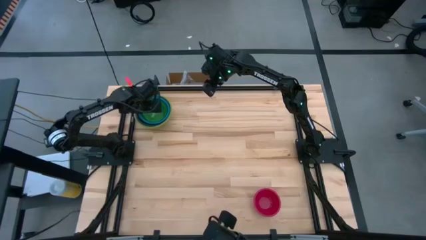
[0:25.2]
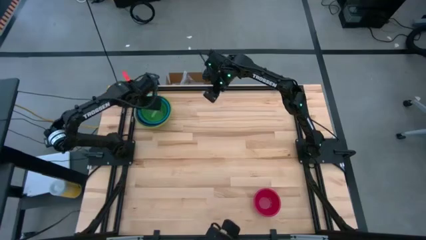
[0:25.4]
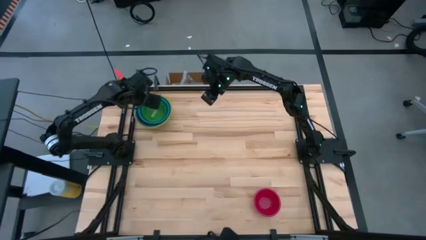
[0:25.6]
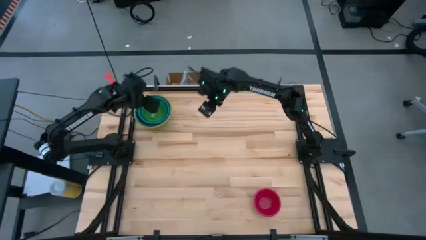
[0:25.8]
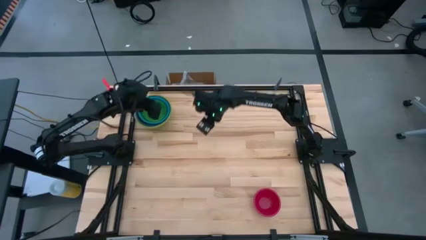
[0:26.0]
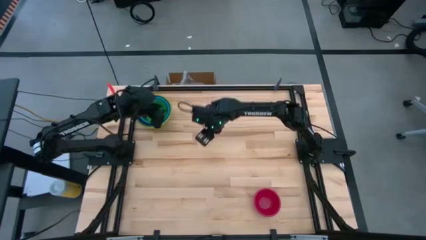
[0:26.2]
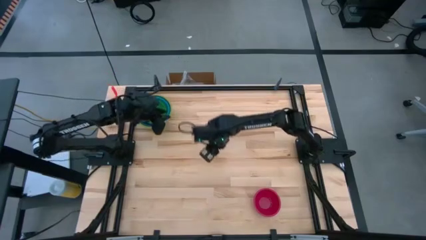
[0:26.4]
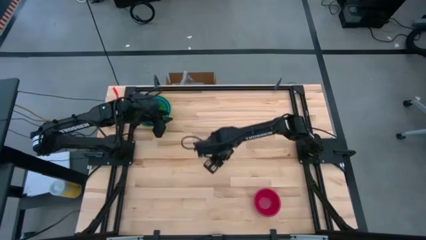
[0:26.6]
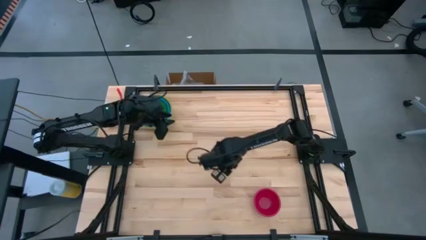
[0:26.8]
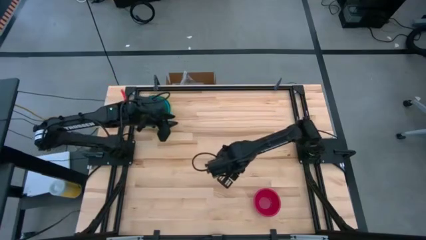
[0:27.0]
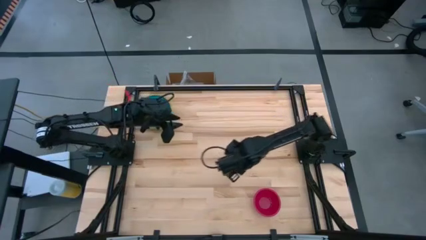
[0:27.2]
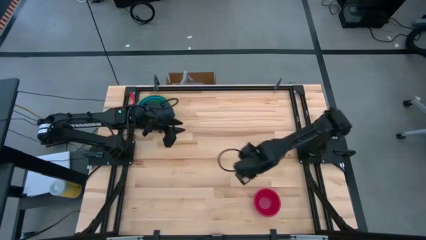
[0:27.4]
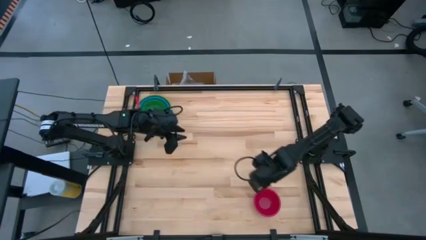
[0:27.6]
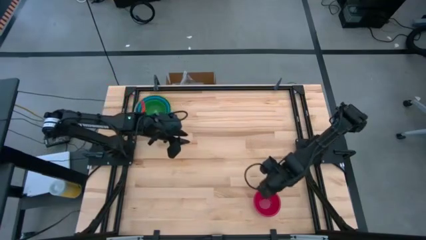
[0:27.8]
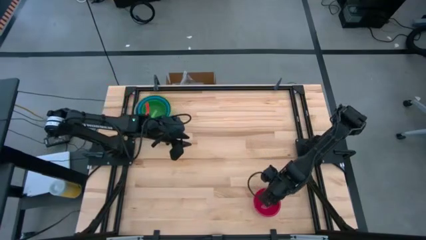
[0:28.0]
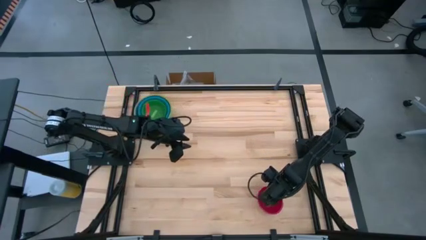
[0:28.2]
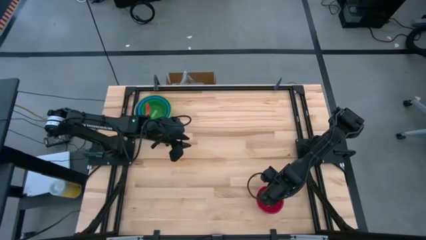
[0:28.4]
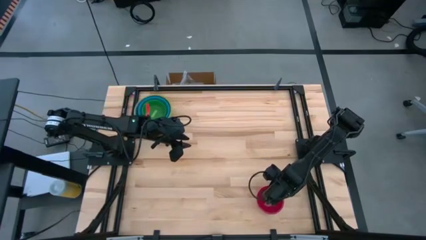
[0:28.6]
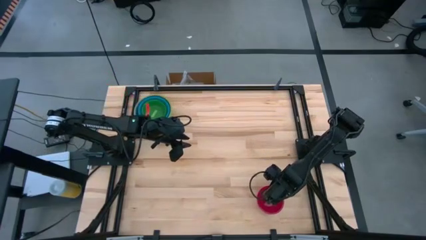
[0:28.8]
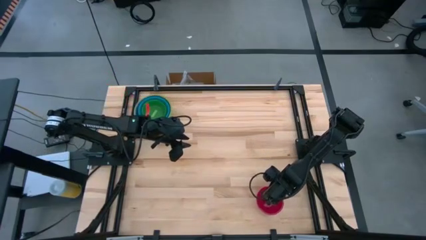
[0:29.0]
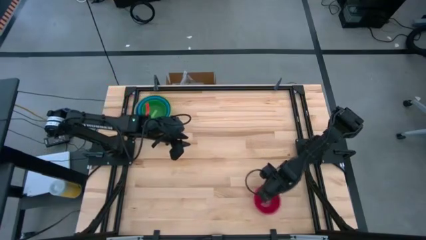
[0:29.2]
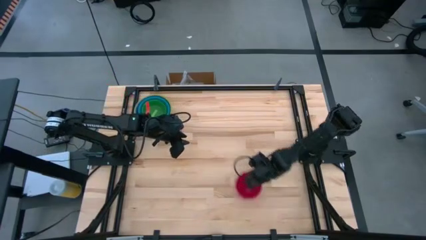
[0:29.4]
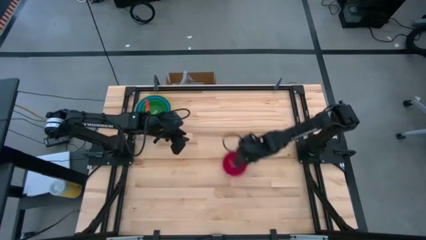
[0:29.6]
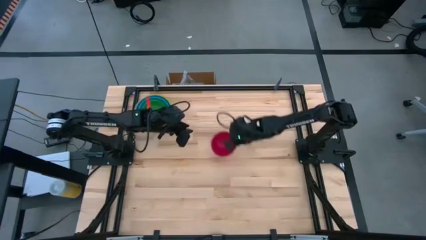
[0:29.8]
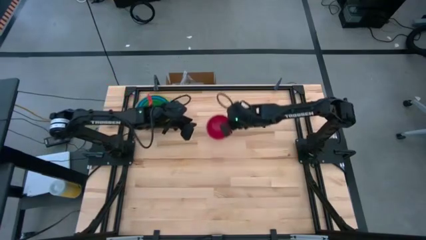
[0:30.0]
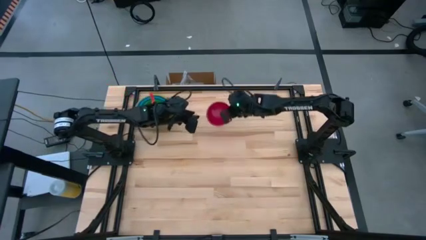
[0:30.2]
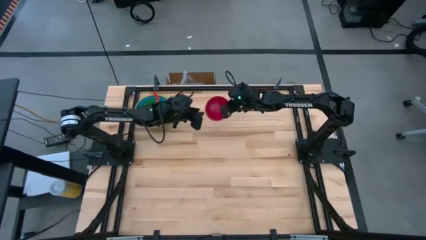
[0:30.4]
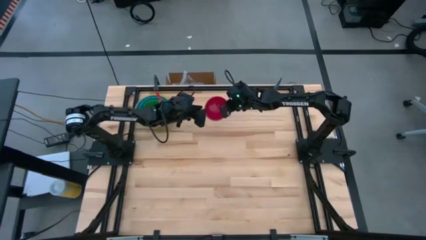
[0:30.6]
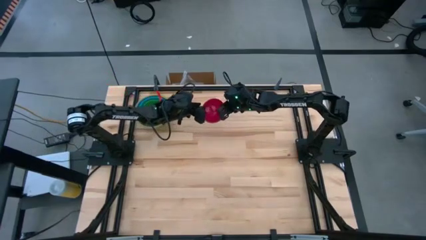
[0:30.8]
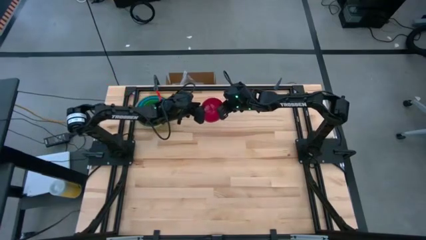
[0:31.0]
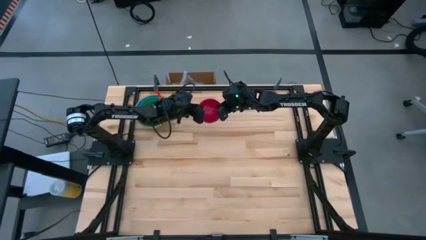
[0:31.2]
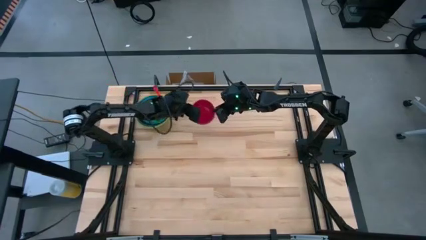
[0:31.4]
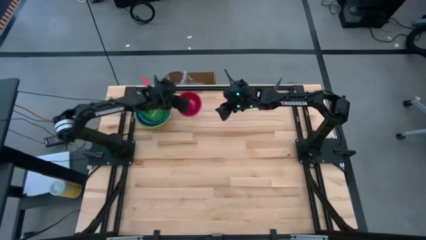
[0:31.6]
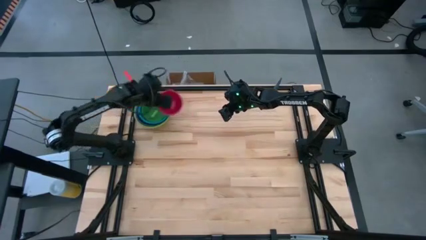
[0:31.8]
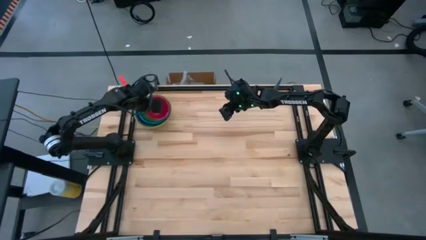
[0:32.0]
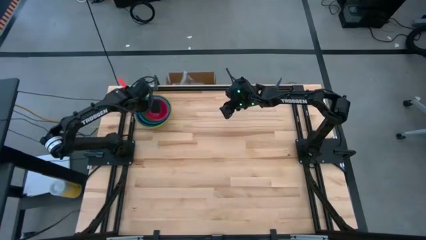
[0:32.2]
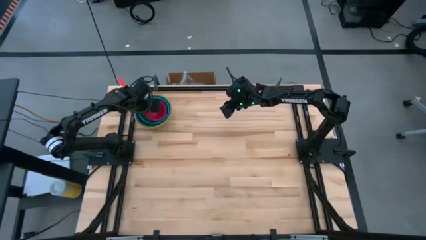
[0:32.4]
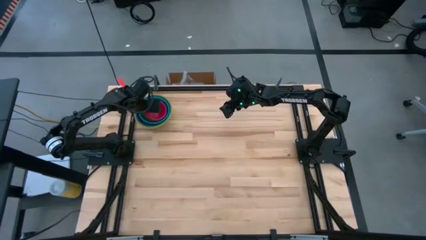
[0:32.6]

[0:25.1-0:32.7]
Stack the red bowl on top of the green bowl

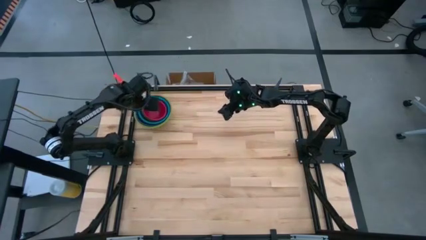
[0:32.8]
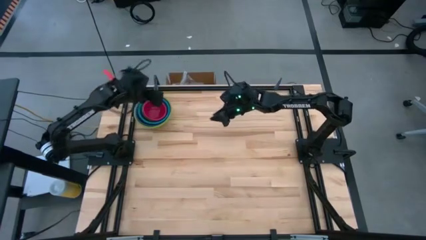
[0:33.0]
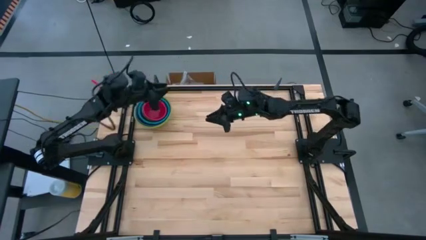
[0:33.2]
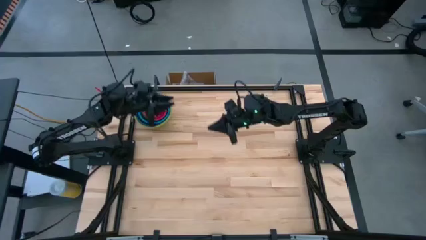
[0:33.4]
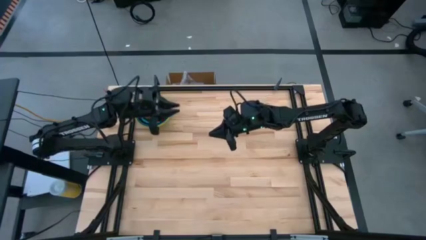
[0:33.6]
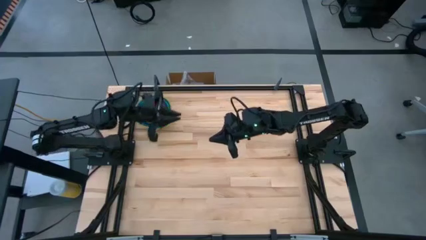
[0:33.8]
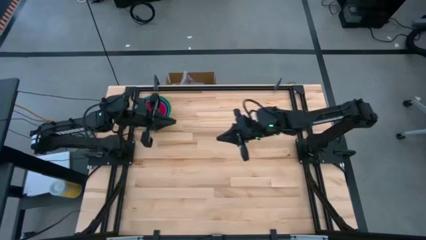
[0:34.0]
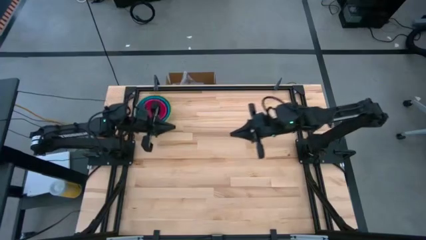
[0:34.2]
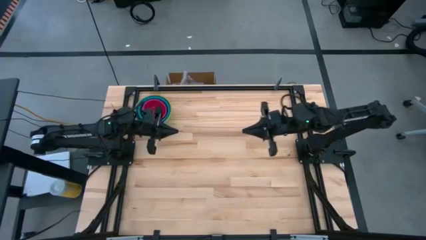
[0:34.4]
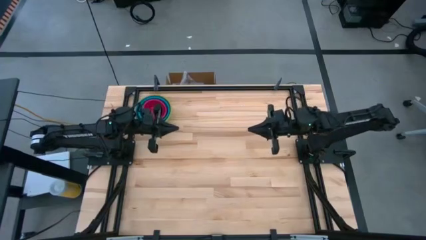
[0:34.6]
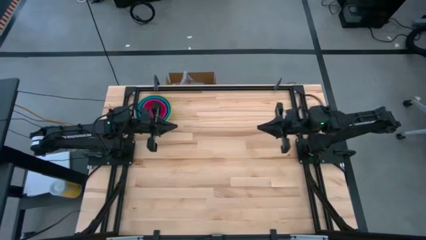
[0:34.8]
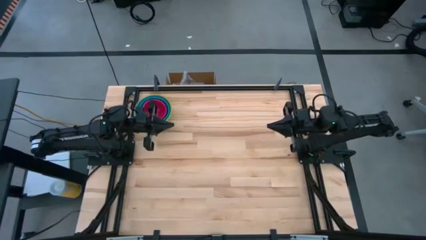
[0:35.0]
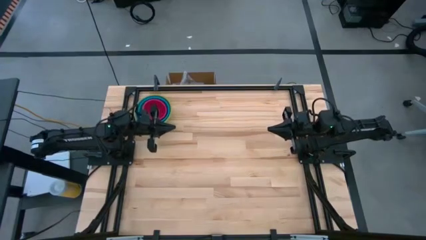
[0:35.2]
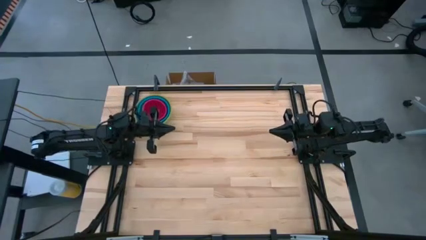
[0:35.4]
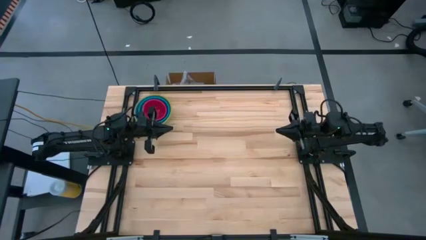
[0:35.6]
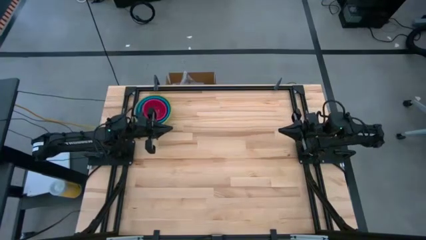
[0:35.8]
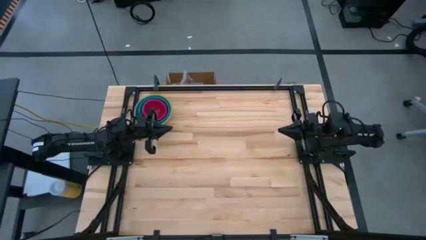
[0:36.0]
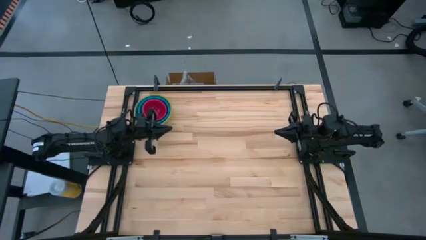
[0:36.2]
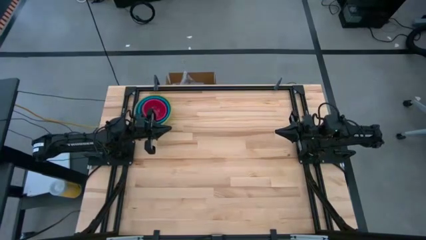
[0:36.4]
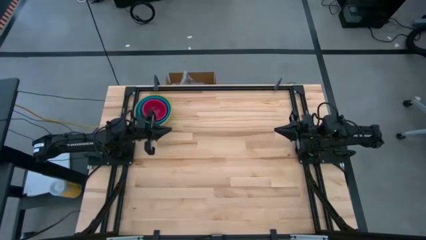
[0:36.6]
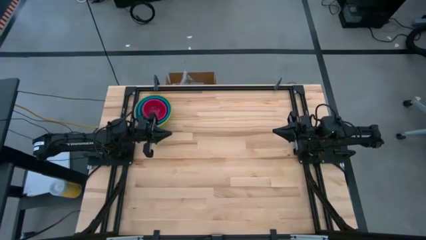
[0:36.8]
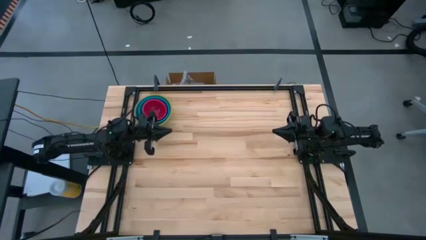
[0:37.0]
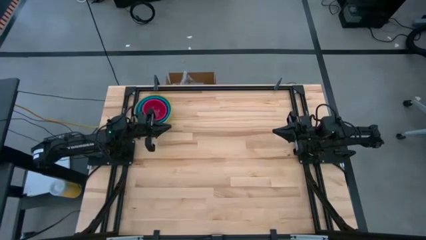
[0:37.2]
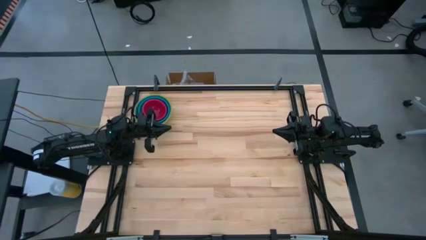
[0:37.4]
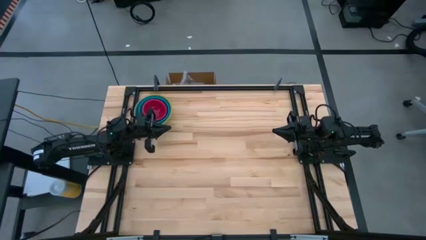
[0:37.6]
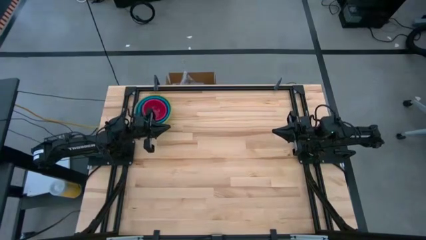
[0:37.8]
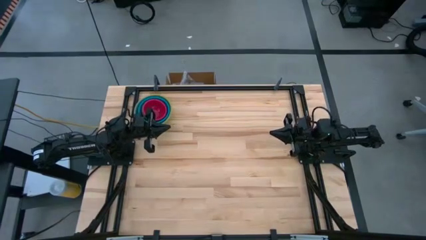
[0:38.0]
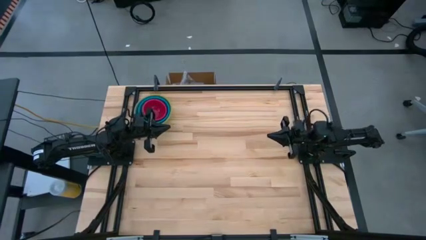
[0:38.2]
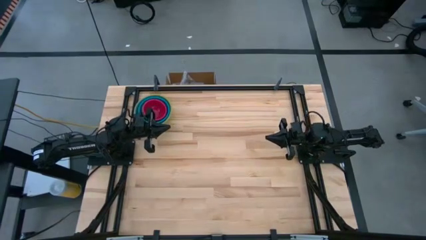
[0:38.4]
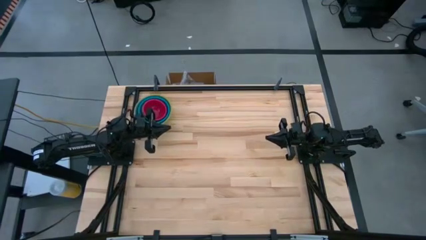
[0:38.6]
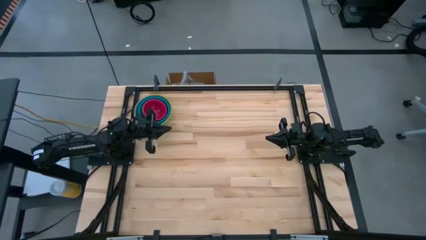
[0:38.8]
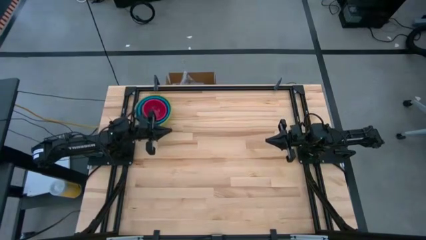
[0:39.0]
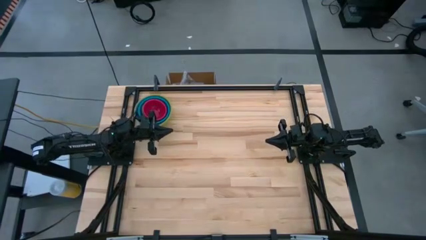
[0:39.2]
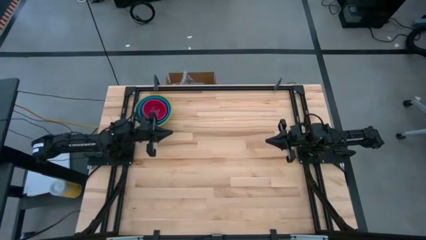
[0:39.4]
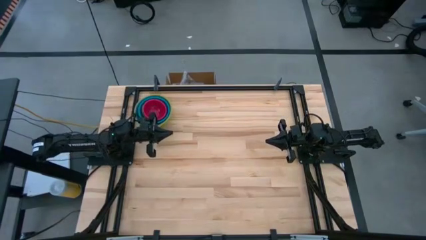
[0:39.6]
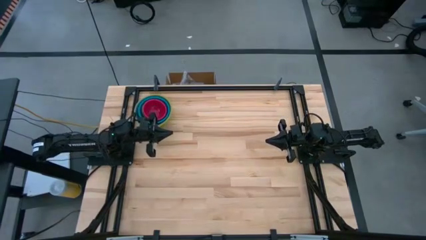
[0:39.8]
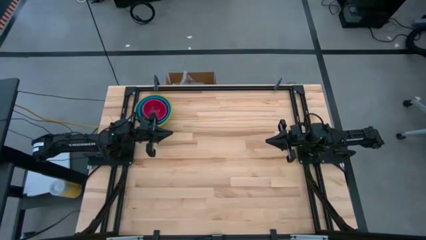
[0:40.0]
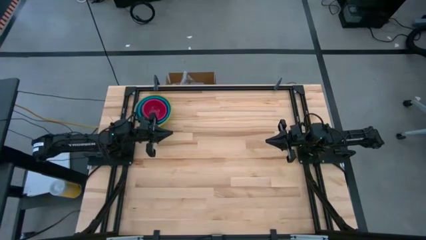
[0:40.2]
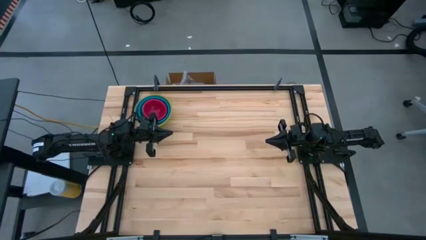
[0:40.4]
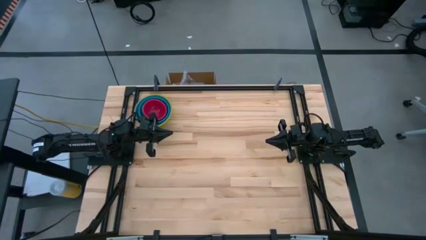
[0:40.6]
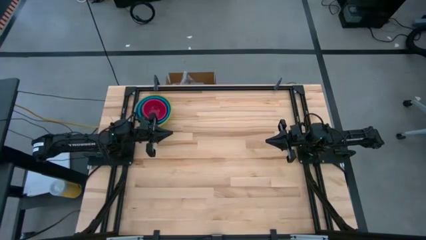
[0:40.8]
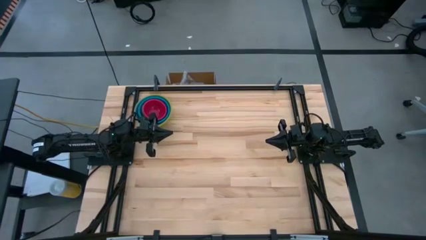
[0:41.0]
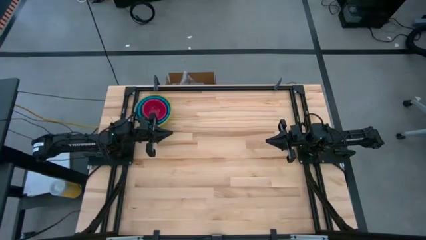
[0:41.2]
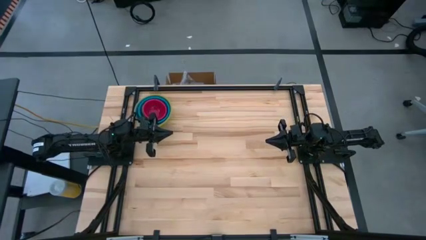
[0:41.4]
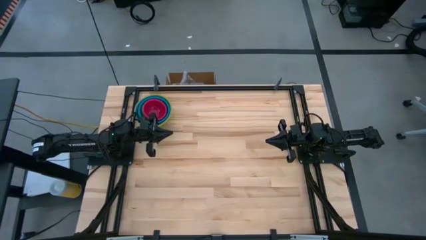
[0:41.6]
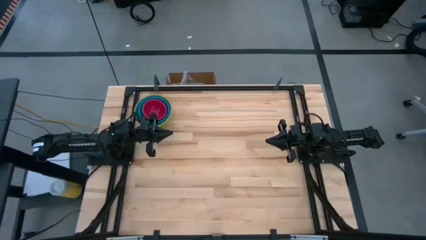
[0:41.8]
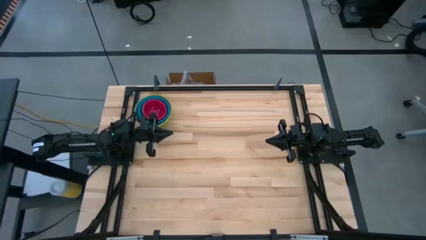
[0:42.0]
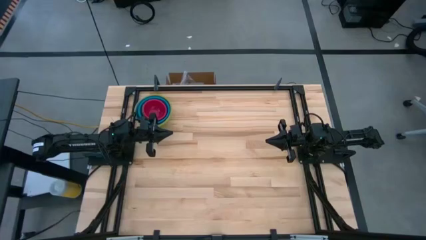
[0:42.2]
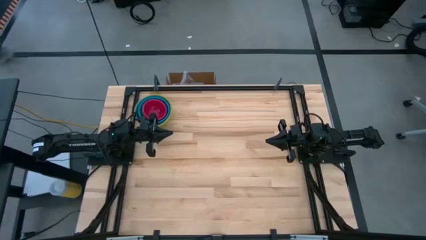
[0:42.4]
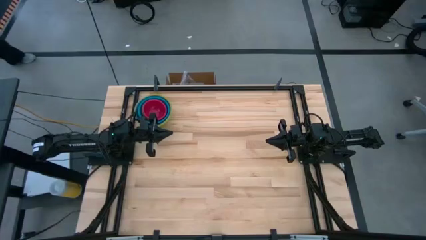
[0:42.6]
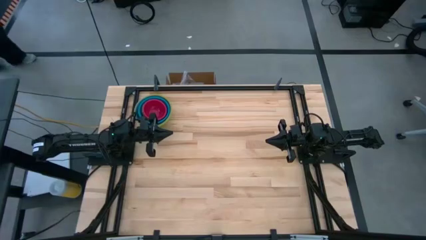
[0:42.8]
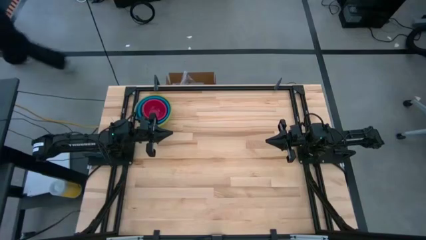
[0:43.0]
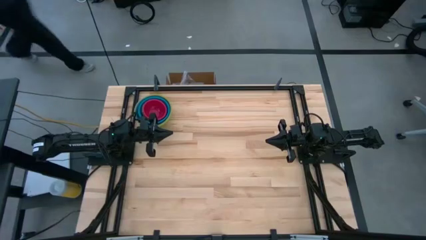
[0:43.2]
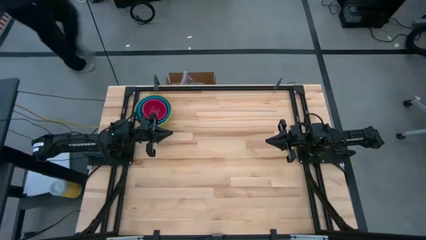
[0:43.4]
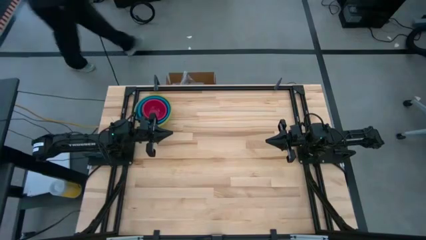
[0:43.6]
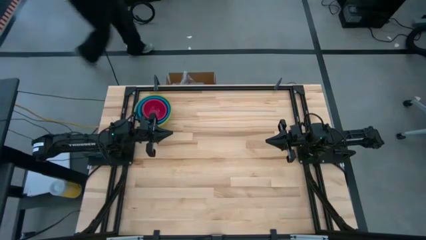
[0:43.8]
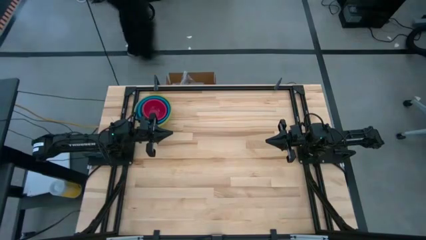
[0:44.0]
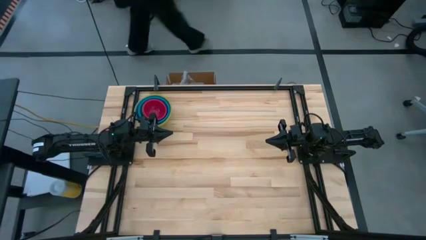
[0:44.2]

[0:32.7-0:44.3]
Return to Home Position
